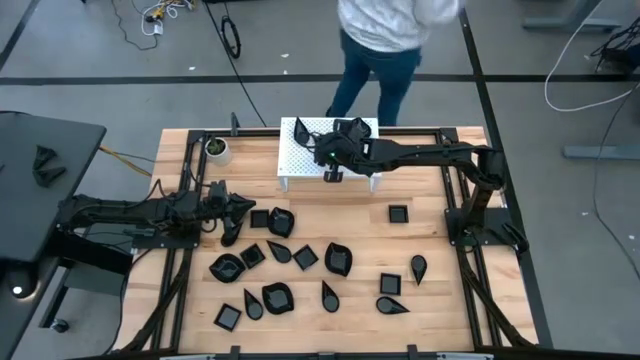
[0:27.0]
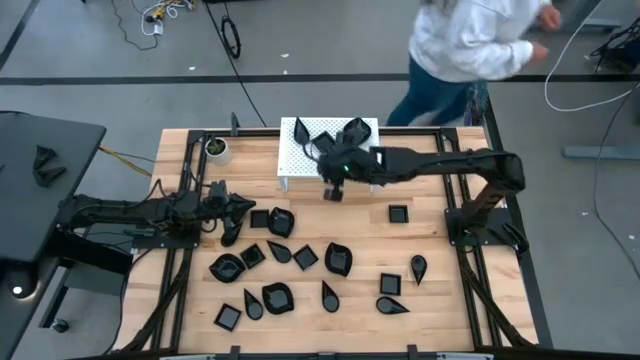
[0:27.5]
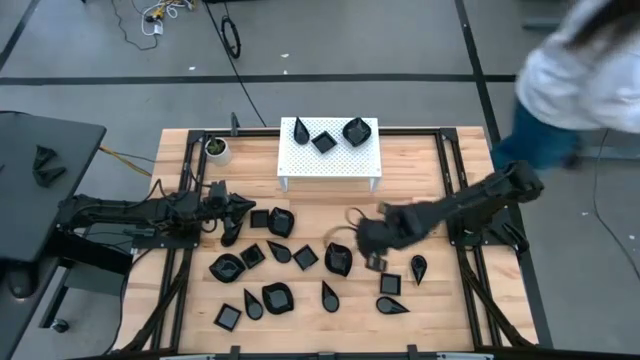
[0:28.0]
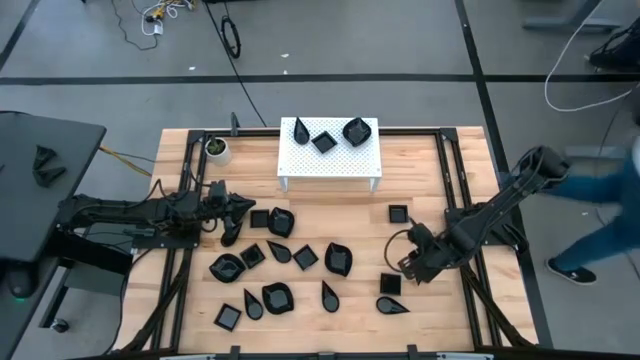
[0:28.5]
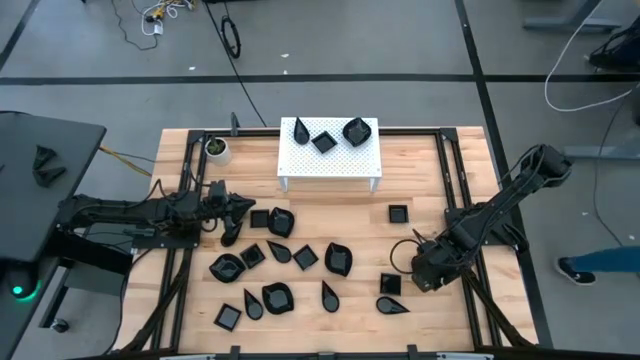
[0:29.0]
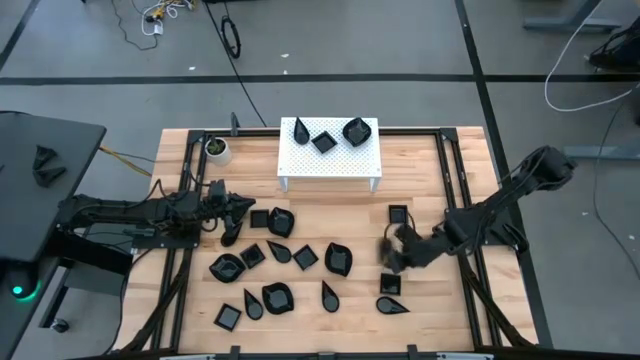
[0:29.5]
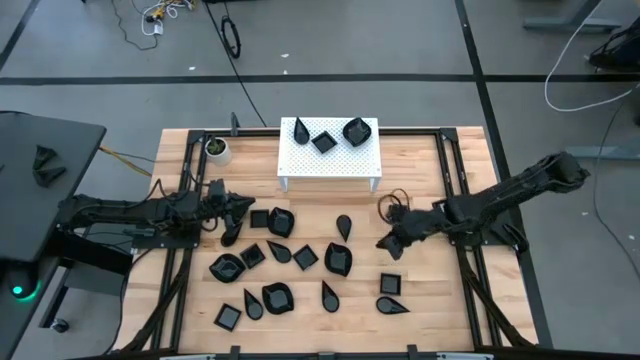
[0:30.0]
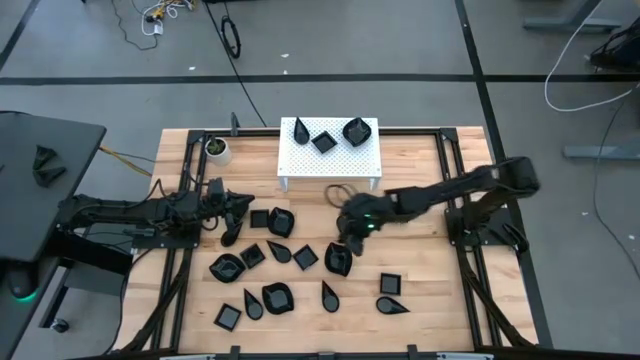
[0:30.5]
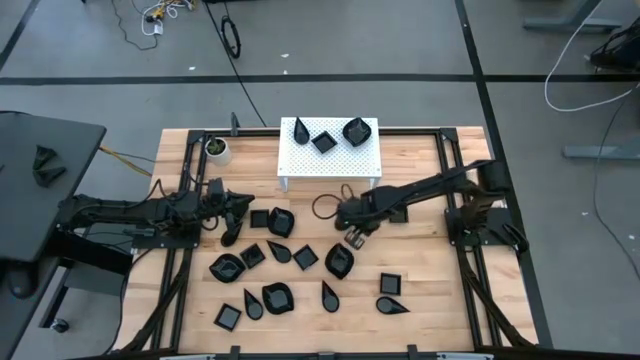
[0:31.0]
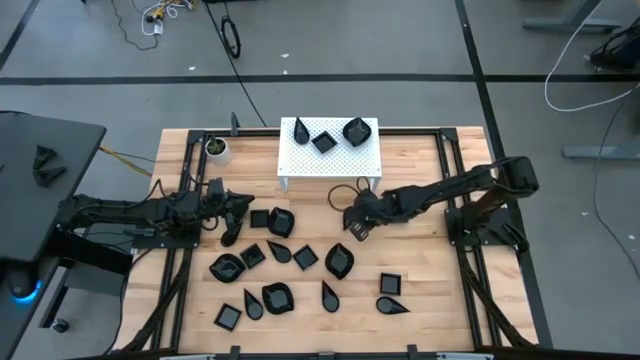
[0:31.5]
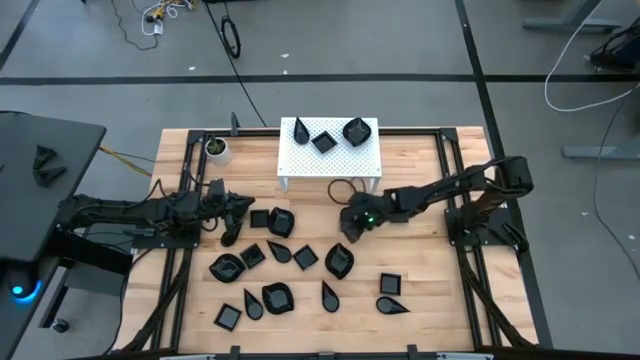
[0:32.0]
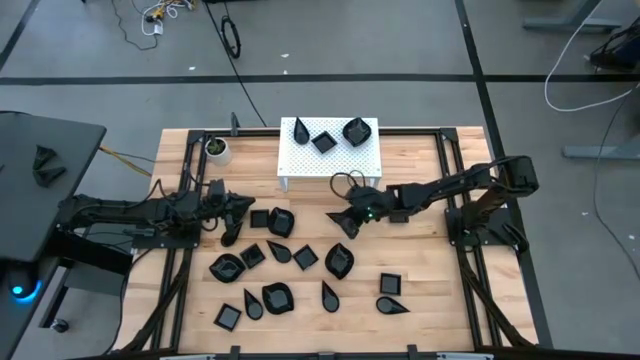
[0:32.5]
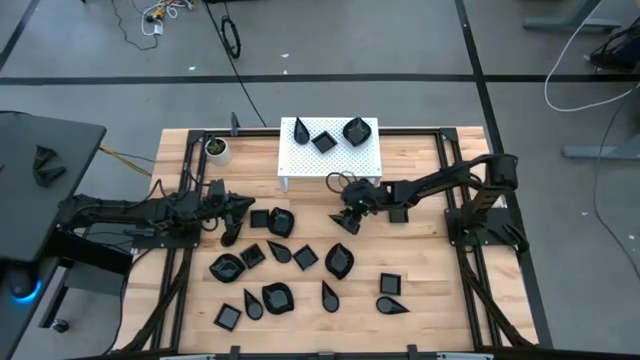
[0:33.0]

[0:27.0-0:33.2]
Task: Pick & Place Mini shaped plates
Stack the black drop-shaped plate on top of the other black drop-shaped plate on the shelf

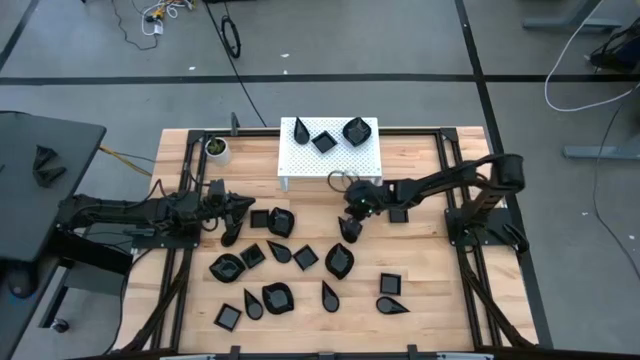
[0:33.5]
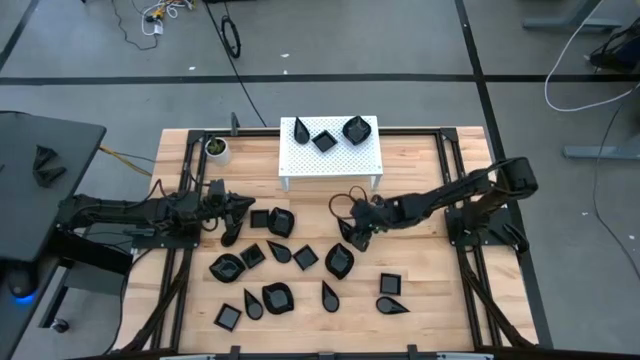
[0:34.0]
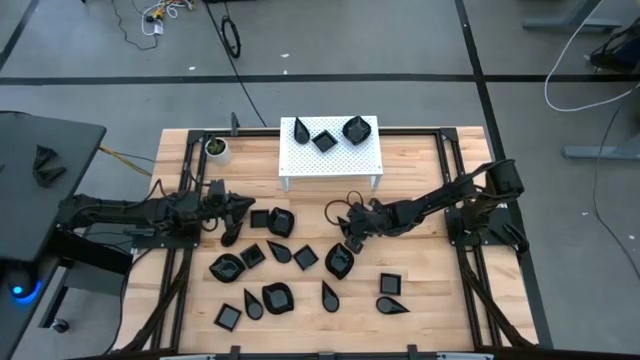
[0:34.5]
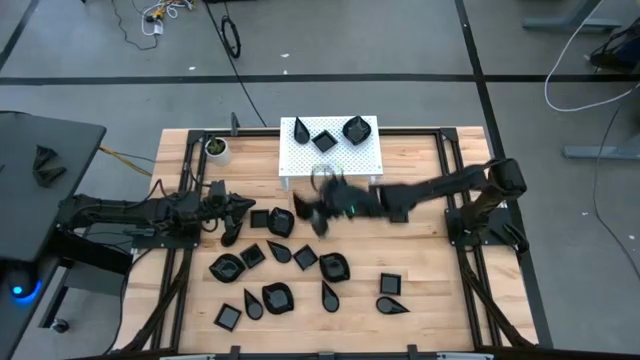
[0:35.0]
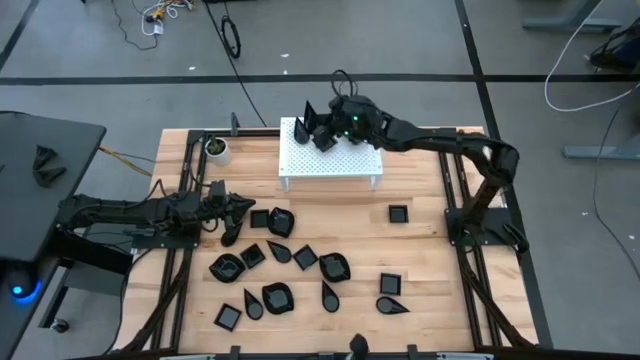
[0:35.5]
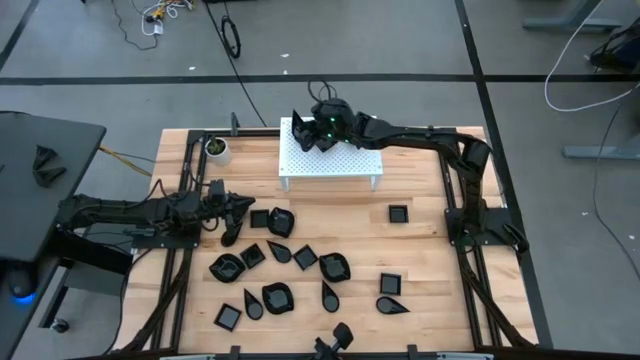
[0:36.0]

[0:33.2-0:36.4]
Stack the black drop-shaped plate on top of the other black drop-shaped plate on the shelf

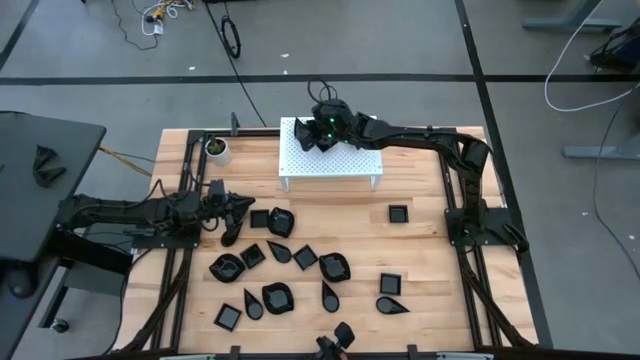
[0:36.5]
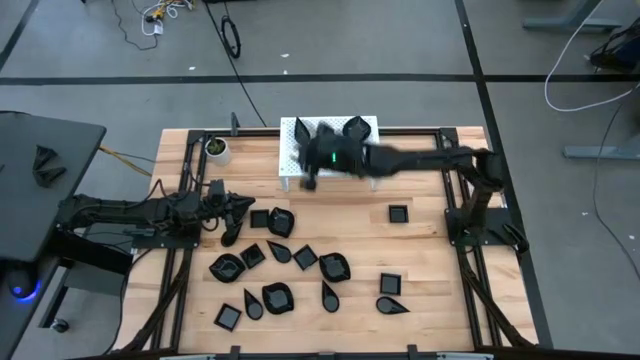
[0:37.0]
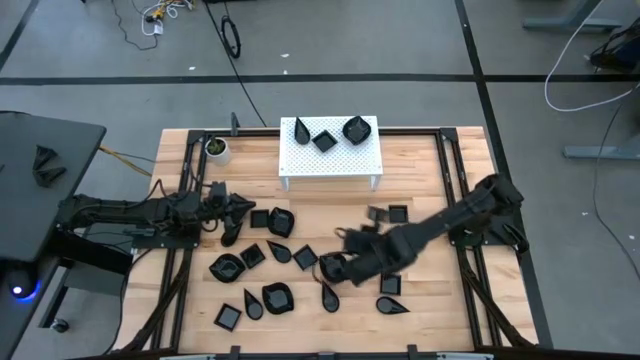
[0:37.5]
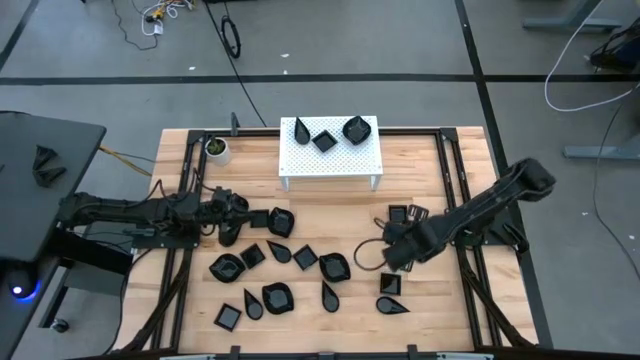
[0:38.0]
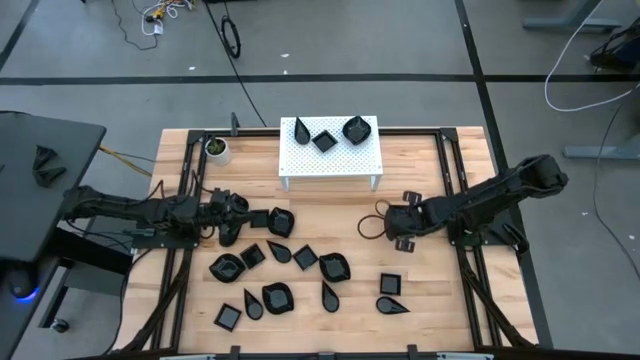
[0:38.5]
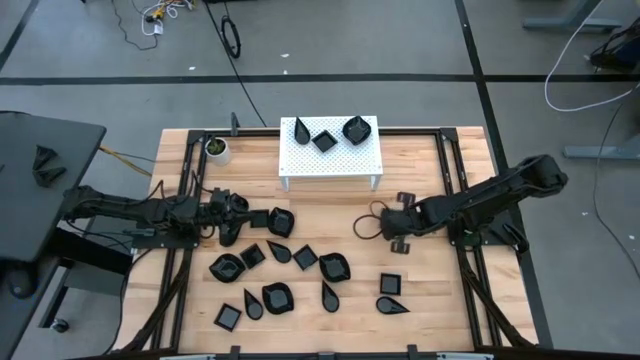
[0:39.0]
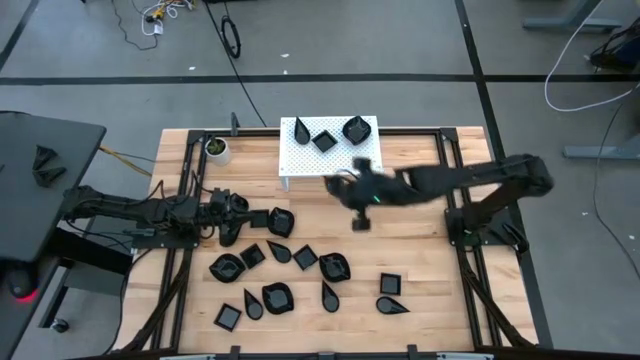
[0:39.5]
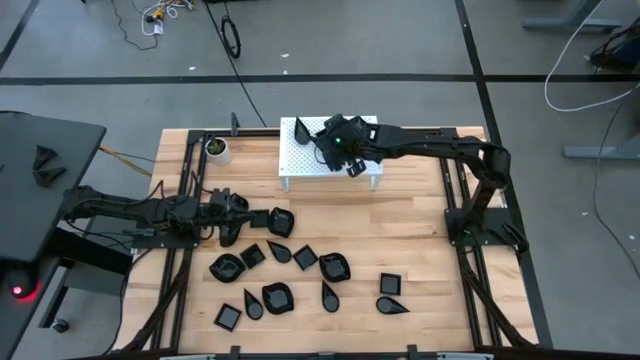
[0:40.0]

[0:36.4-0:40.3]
Stack the black square plate on top of the other black square plate on the shelf

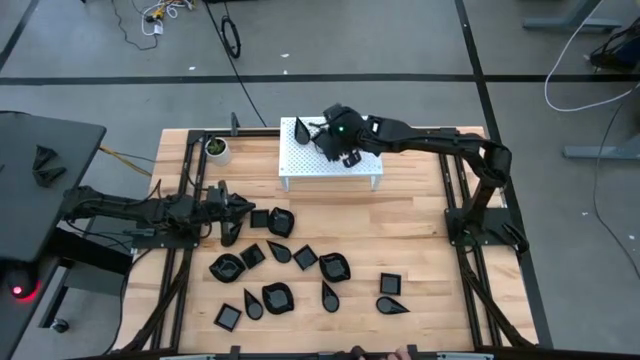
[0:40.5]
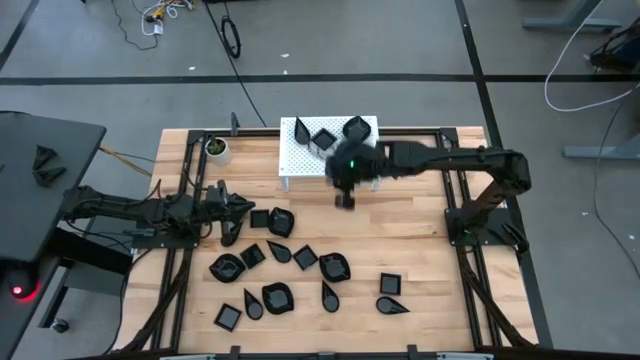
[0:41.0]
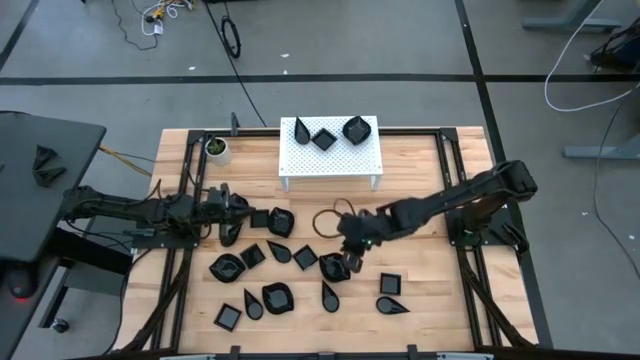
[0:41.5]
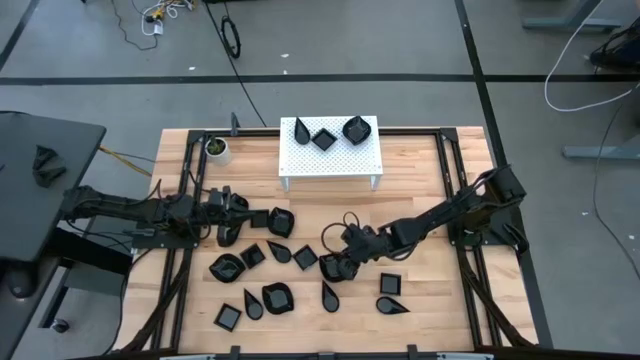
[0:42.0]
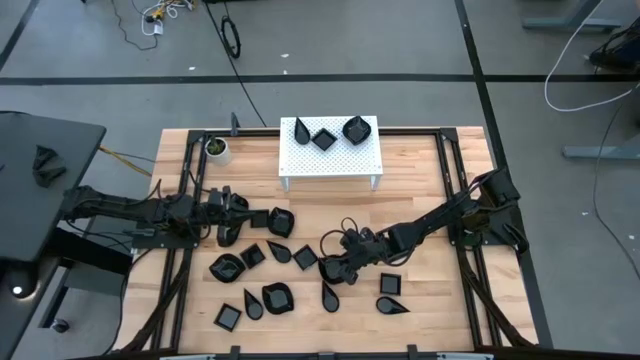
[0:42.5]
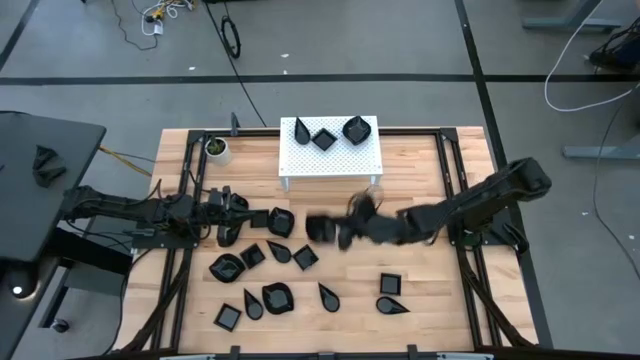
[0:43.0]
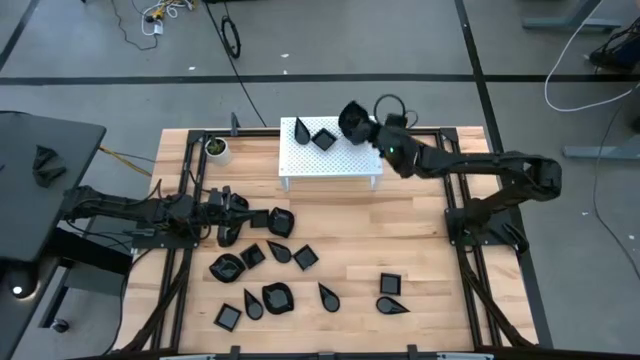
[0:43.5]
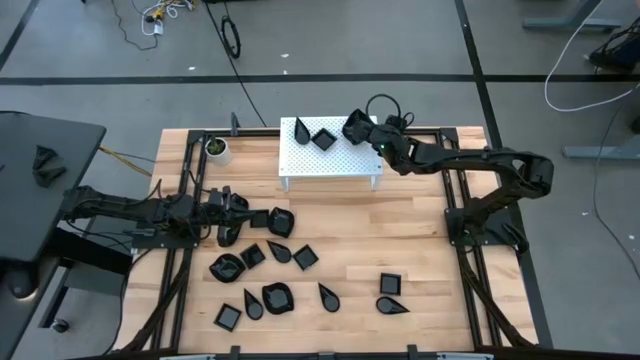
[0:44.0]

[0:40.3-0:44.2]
Stack the black leaf-shaped plate on top of the other black leaf-shaped plate on the shelf

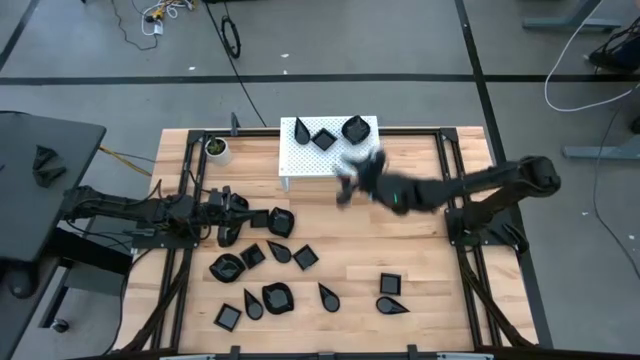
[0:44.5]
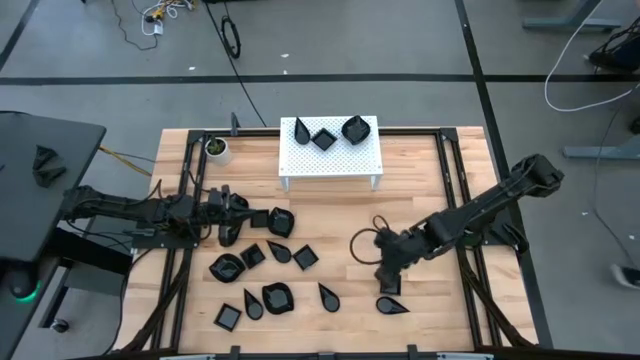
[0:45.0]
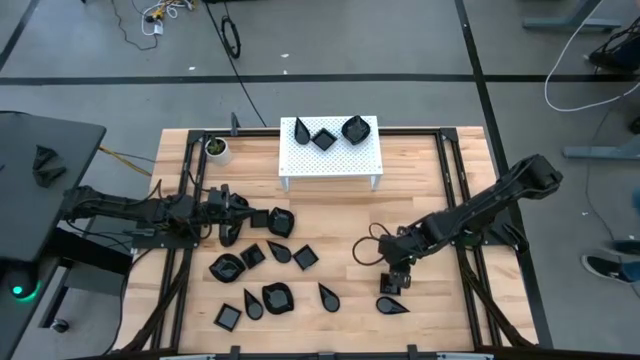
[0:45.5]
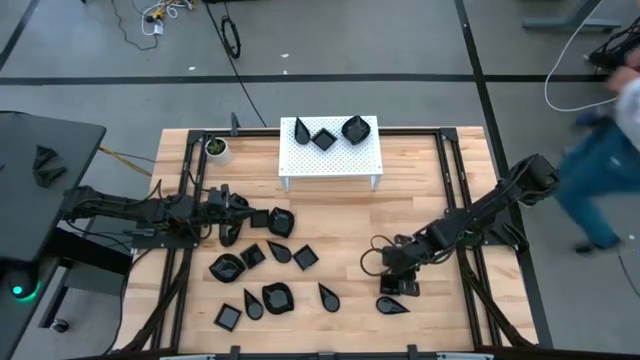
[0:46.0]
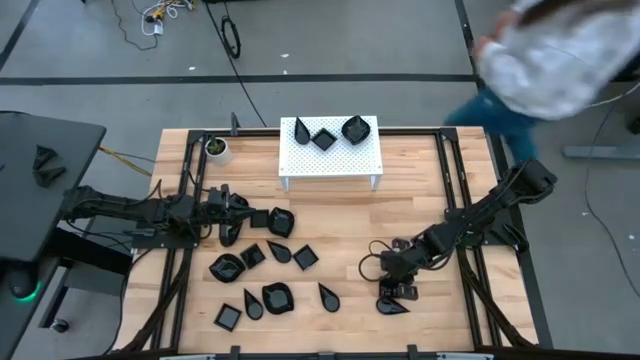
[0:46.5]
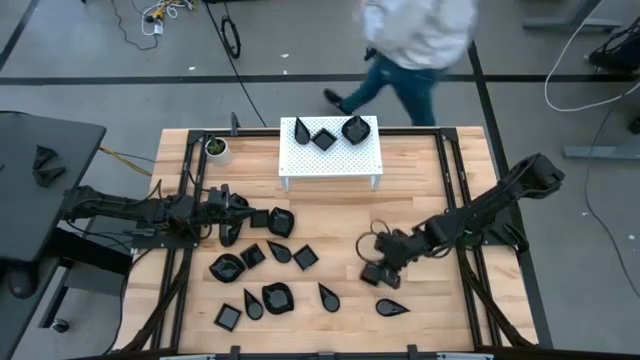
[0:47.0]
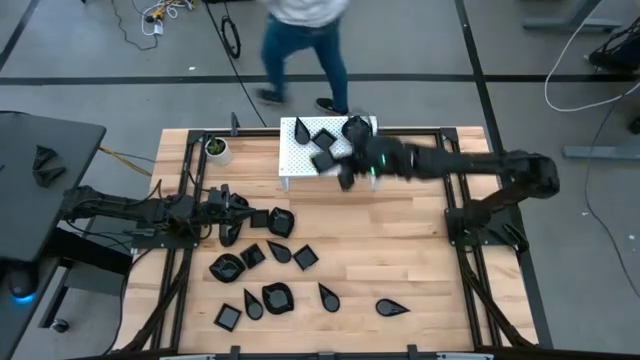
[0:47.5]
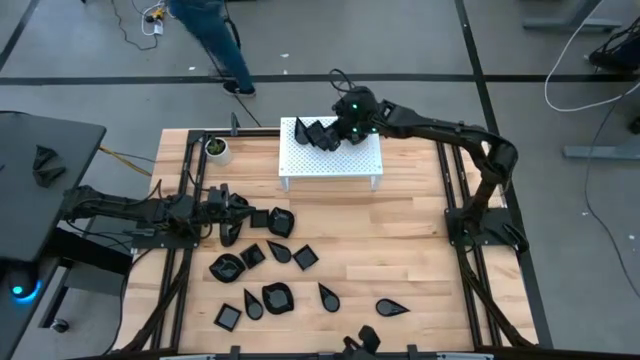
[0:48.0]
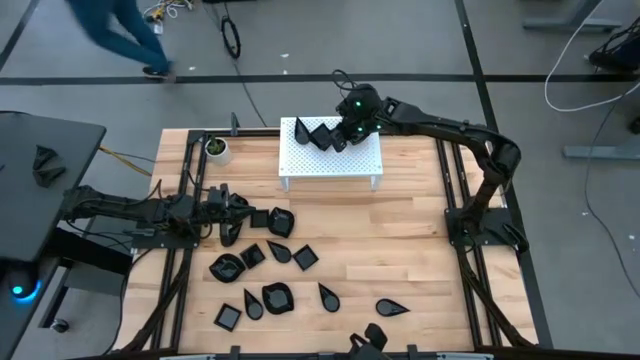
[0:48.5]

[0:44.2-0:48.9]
Stack the black square plate on top of the other black square plate on the shelf
